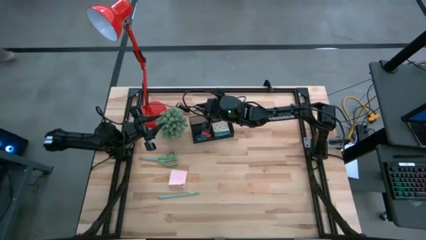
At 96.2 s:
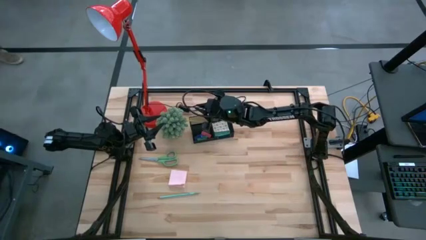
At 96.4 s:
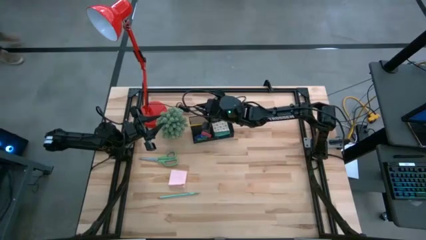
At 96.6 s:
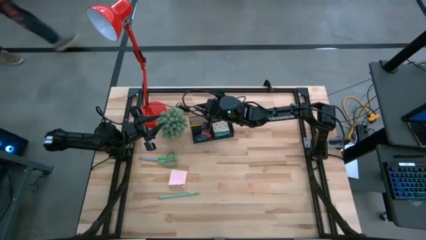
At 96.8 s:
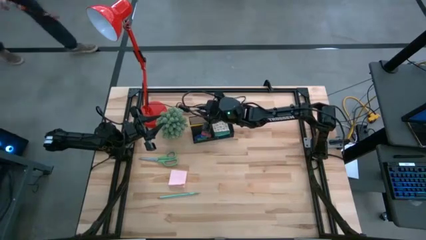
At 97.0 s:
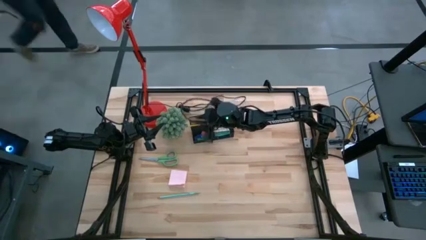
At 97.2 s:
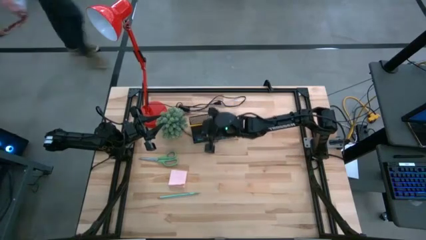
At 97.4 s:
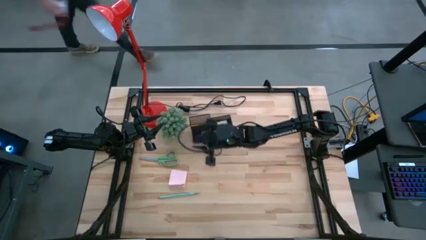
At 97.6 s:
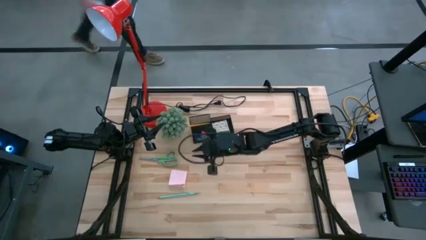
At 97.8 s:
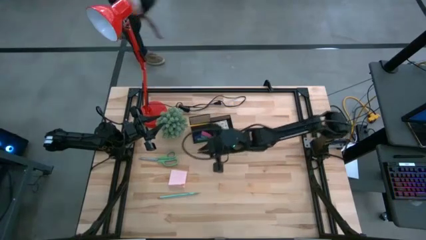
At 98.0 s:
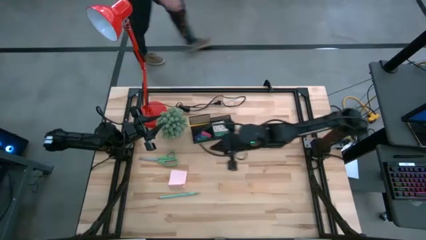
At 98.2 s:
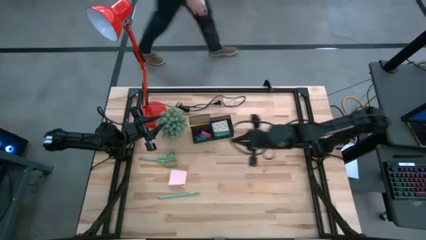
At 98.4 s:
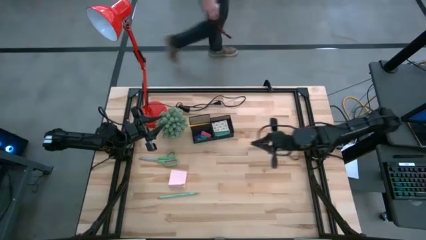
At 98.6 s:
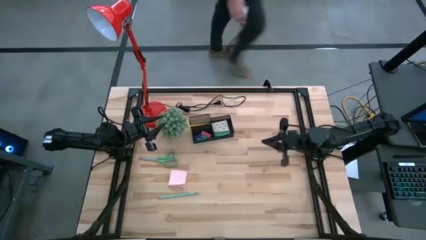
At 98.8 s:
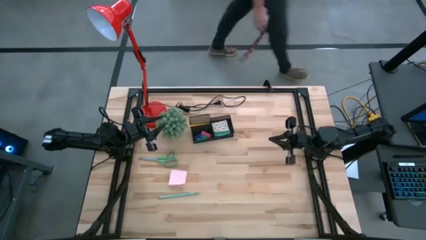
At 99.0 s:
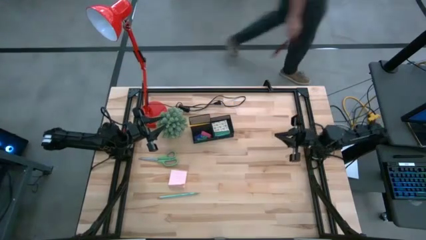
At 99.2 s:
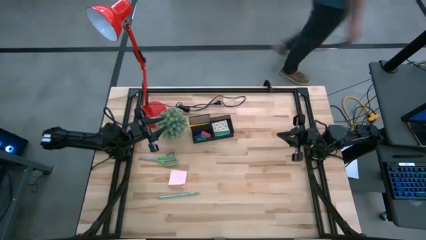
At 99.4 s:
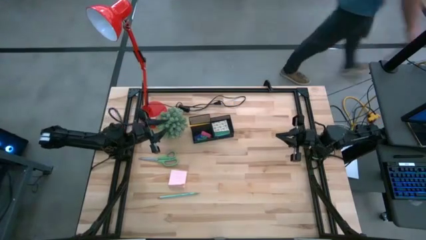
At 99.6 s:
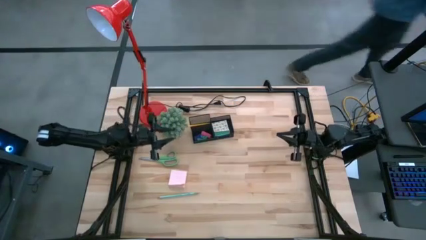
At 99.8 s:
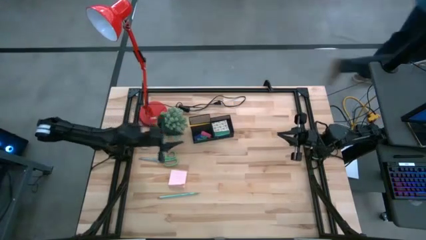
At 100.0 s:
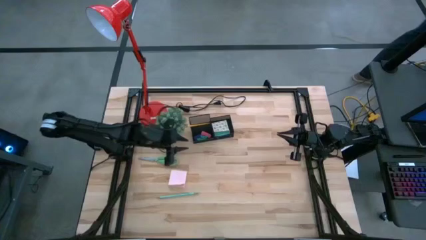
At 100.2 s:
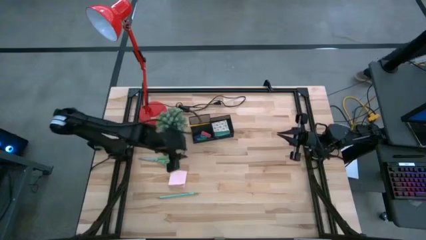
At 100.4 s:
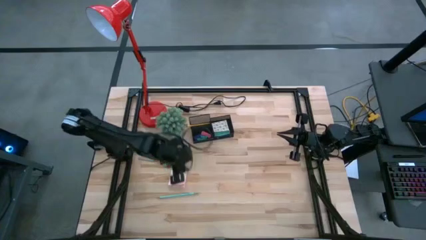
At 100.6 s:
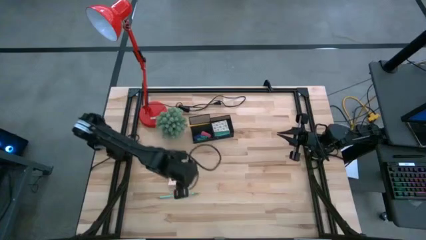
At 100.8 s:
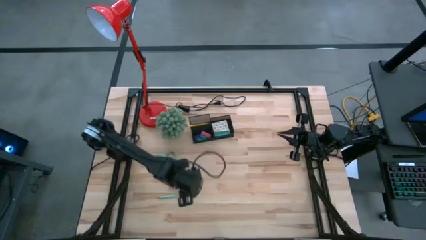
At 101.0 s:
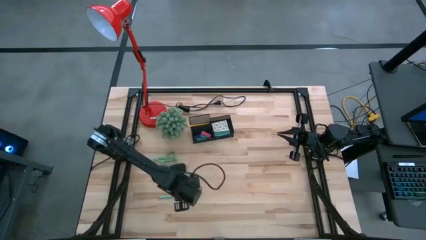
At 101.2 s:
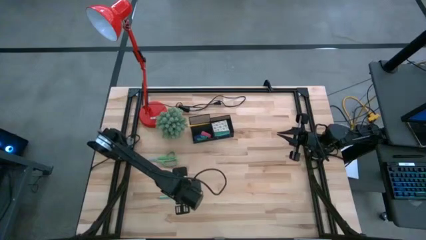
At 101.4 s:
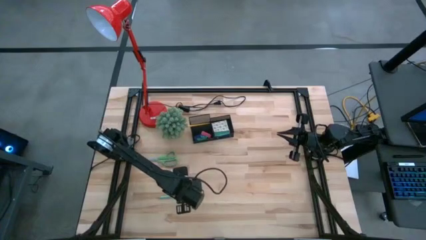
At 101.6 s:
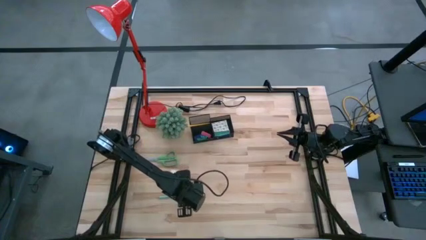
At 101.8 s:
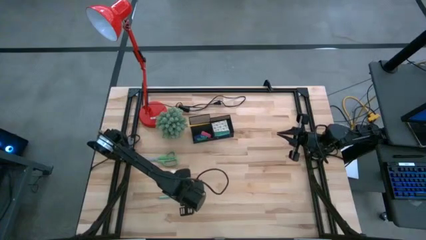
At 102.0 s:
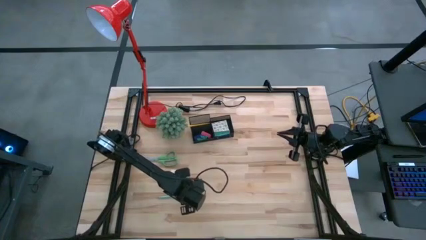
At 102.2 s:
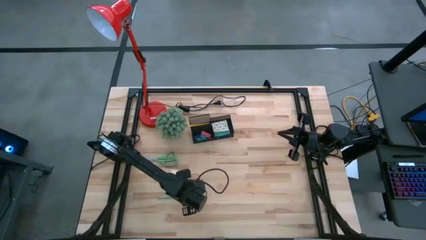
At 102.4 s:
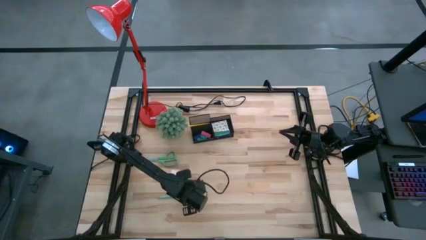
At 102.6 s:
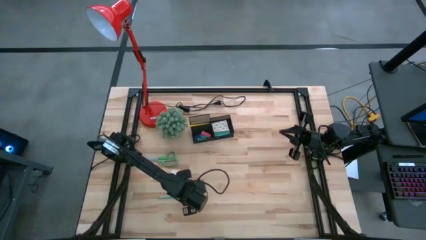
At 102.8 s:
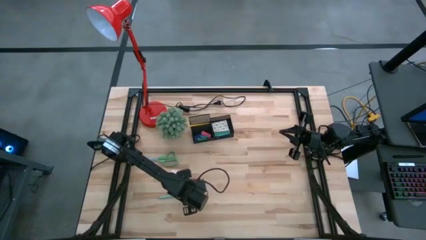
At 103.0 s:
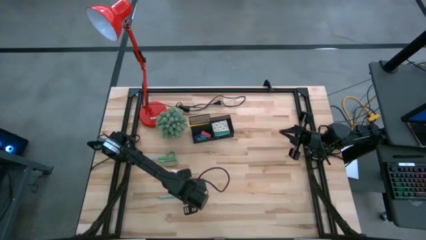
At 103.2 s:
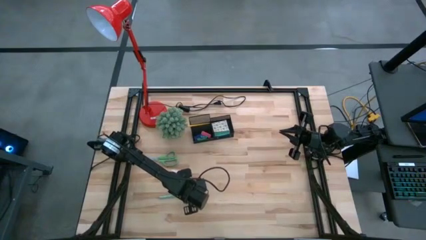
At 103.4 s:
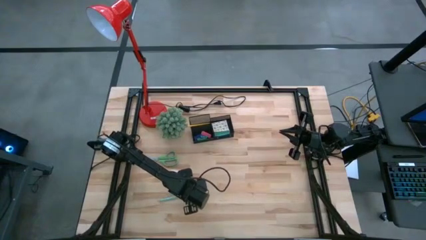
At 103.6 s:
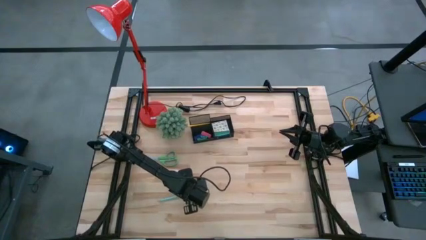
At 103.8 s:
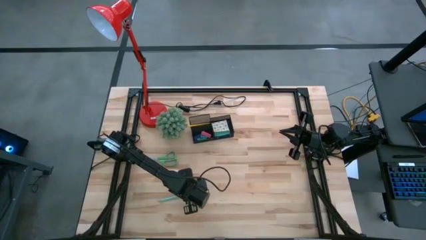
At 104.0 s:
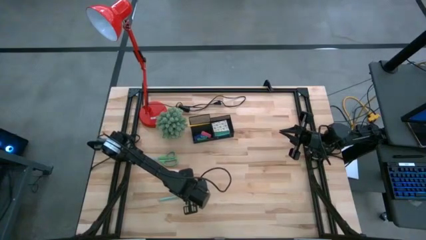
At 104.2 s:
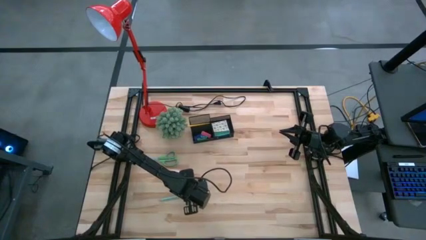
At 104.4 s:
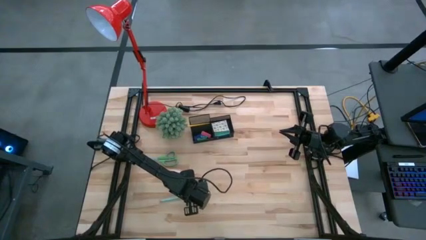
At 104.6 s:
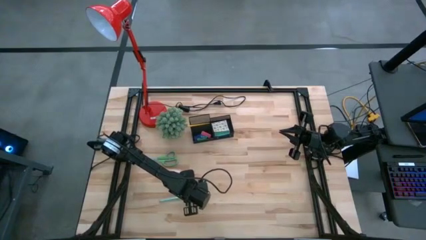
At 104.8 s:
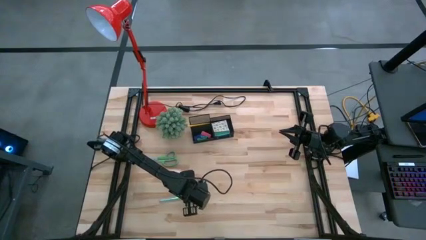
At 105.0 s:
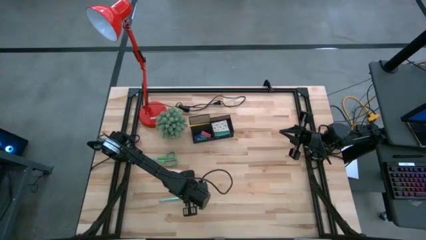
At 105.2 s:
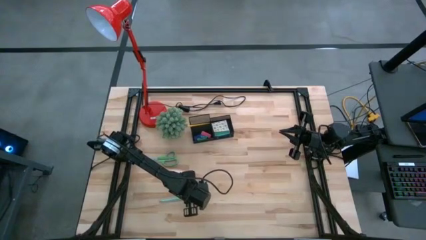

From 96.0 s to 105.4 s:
Task: Pick and place office supplies into organizer
Put the blue pencil into the desk organizer

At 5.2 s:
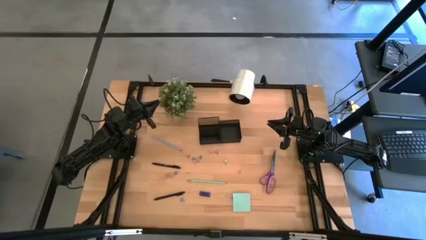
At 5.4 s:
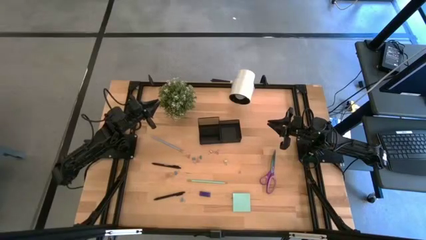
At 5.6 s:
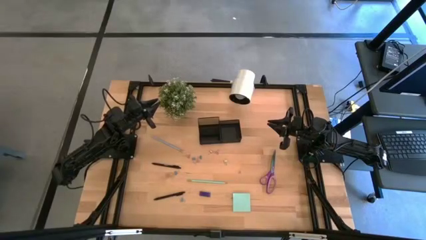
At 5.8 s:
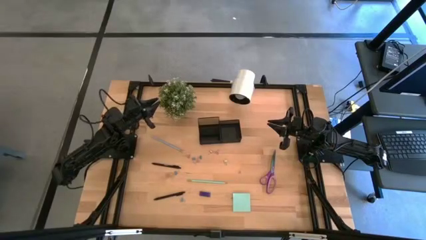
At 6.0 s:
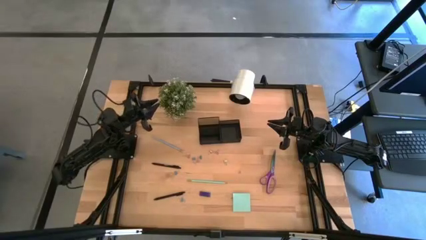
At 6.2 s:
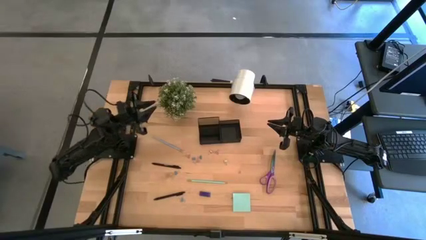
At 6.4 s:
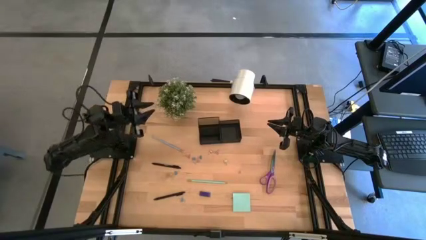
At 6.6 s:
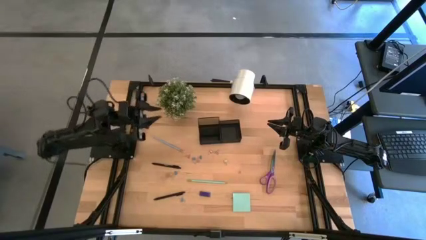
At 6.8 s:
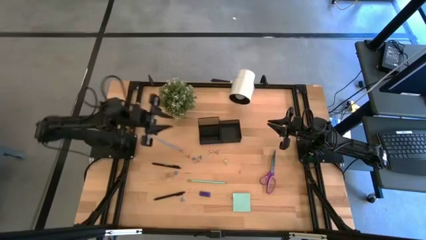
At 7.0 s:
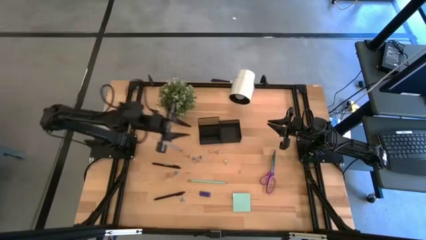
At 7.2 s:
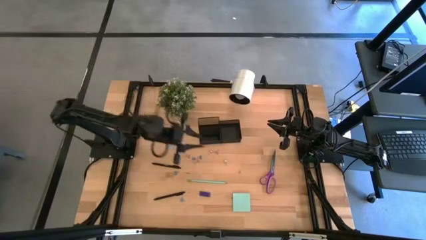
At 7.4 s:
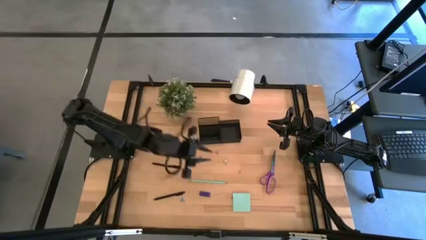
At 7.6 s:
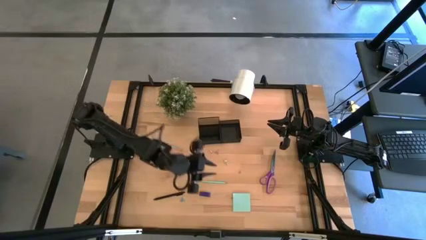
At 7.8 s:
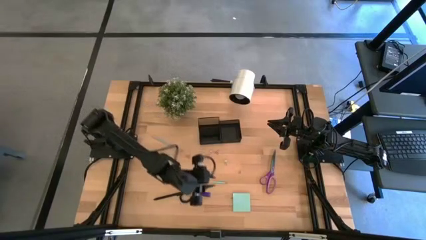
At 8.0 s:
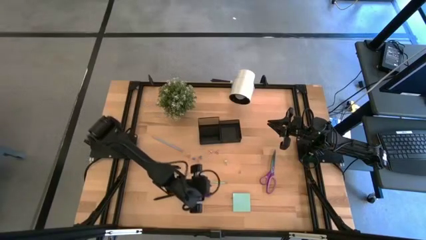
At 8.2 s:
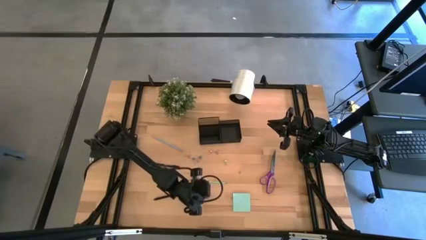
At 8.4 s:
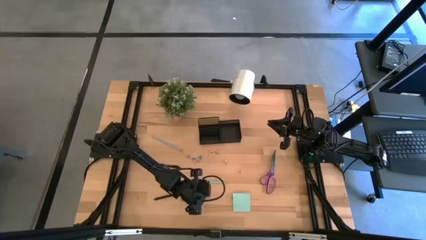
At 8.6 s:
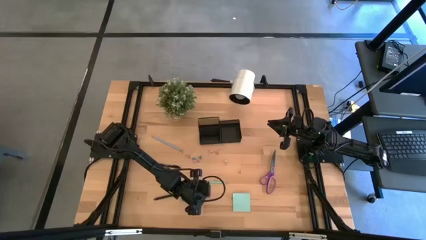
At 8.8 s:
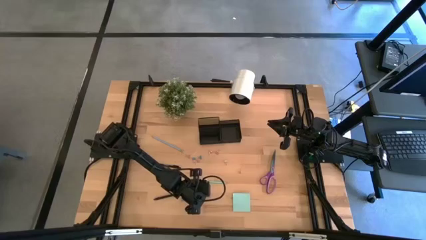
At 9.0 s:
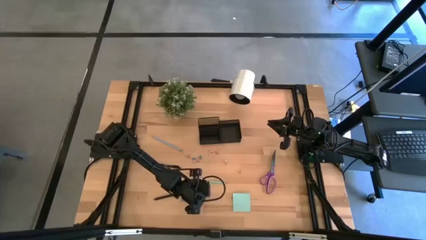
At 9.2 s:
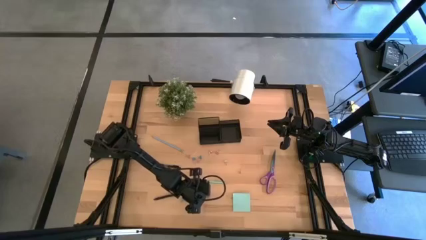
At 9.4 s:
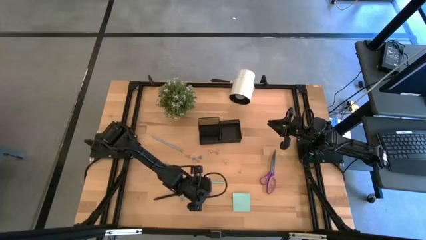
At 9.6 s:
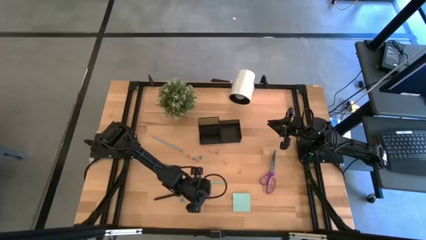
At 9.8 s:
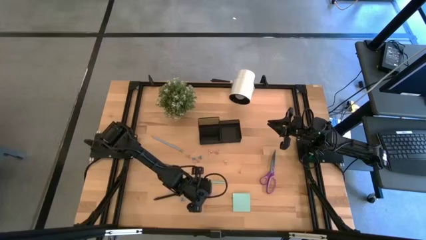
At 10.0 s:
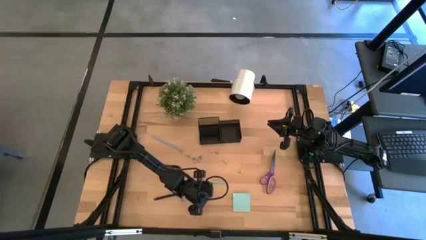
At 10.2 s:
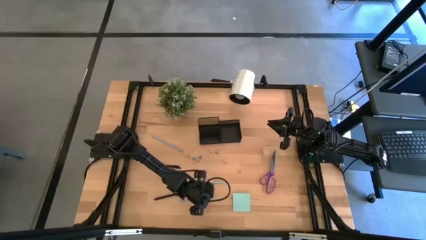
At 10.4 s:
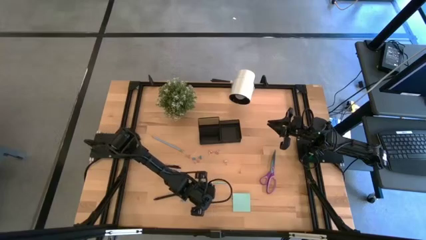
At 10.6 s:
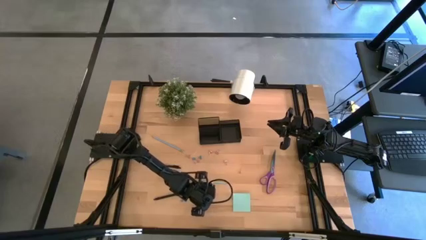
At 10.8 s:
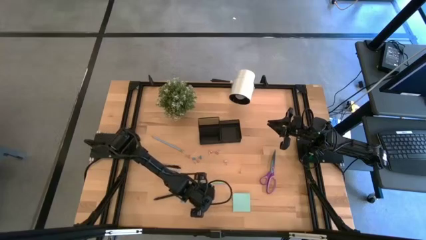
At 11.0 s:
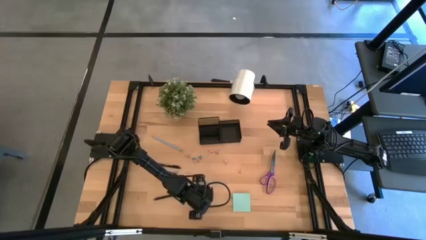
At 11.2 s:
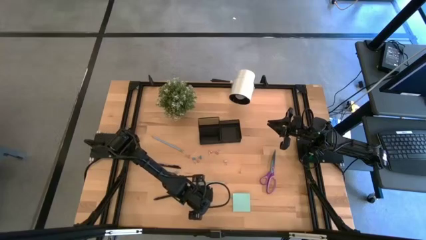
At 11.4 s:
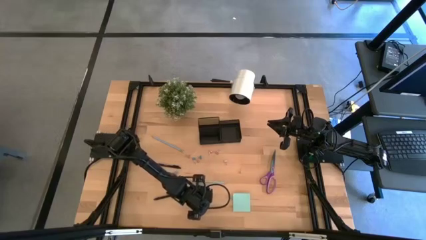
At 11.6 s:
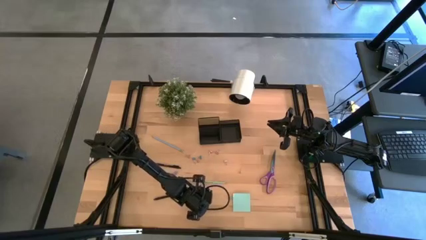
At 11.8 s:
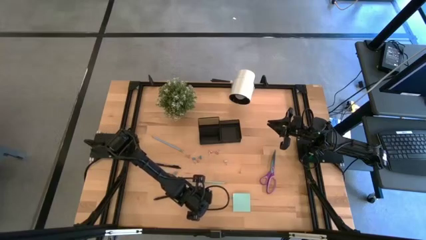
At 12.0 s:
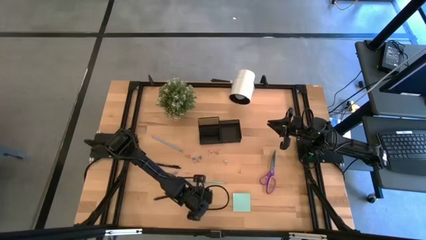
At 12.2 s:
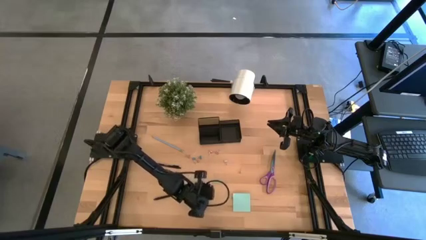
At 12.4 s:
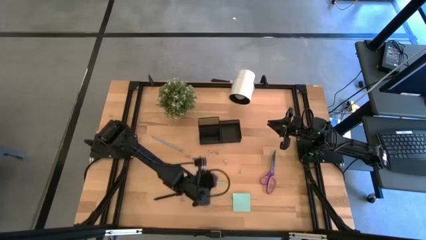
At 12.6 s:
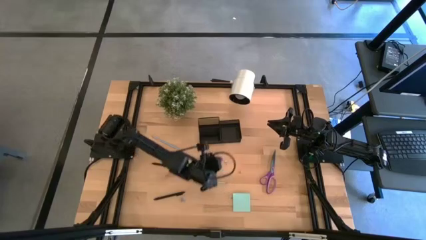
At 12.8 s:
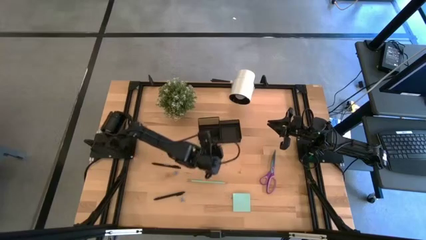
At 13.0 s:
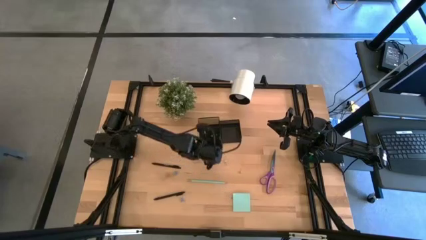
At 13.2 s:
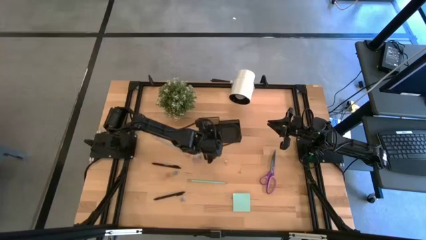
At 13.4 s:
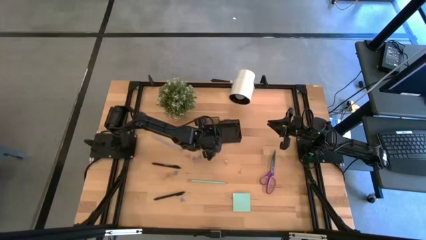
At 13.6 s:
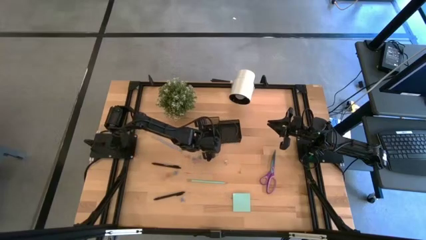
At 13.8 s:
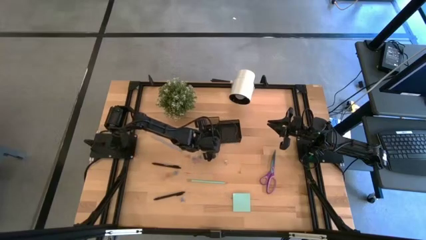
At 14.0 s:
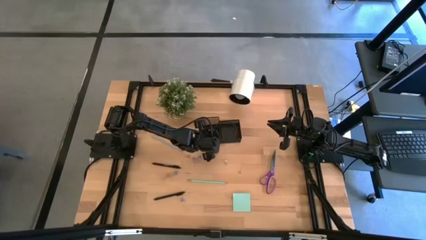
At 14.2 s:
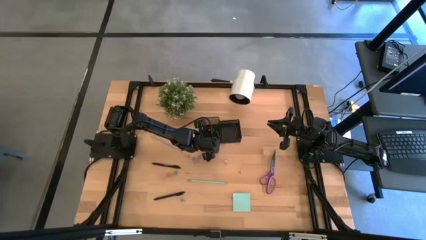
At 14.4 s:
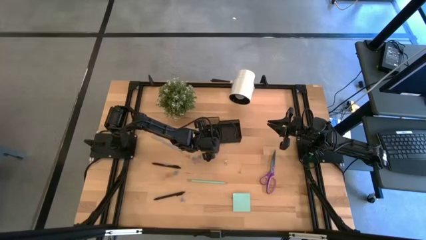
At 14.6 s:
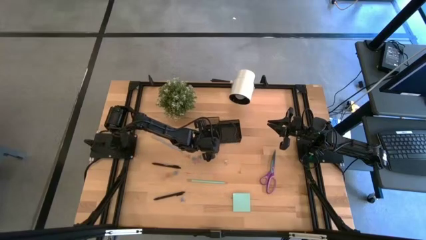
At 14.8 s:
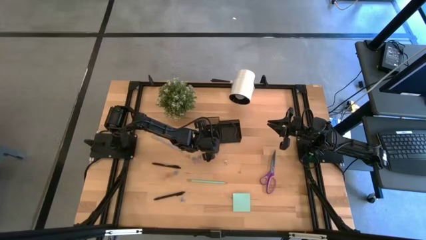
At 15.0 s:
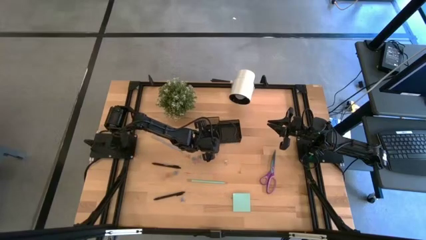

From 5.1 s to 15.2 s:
Task: Pick and place office supplies into organizer
Put the blue eraser into the black desk organizer
